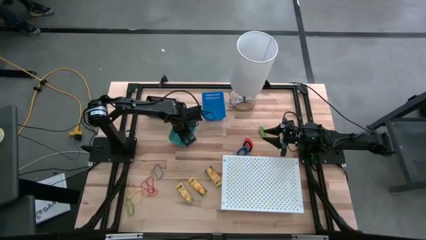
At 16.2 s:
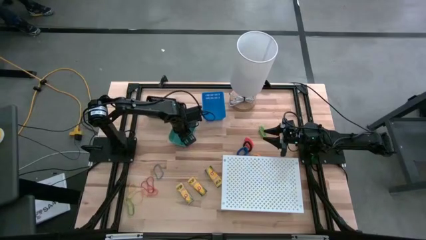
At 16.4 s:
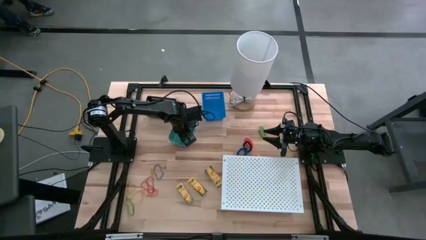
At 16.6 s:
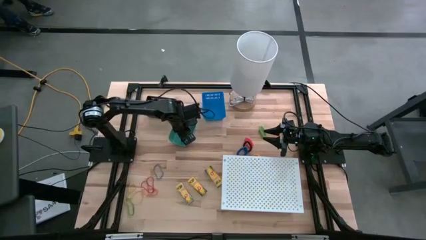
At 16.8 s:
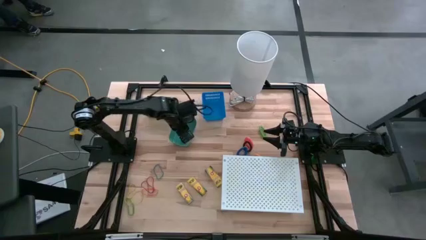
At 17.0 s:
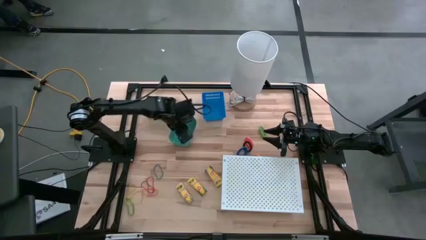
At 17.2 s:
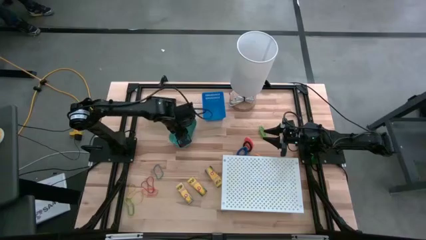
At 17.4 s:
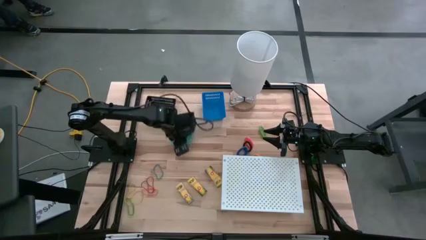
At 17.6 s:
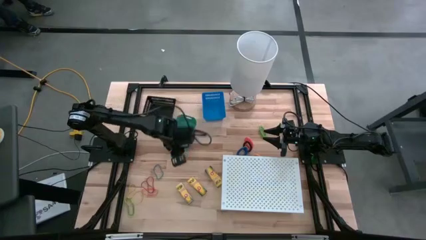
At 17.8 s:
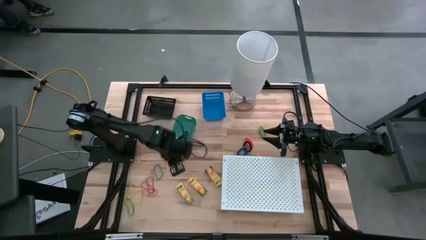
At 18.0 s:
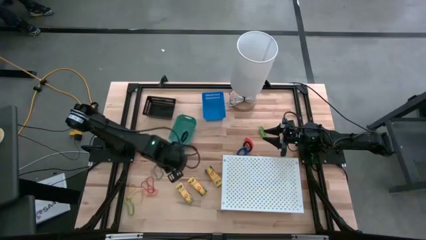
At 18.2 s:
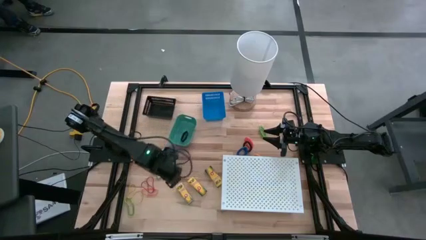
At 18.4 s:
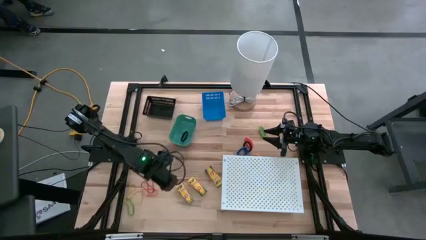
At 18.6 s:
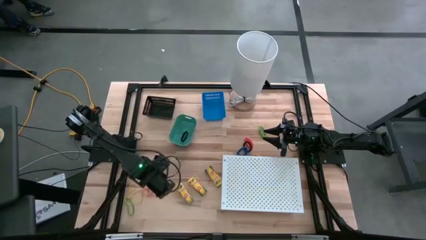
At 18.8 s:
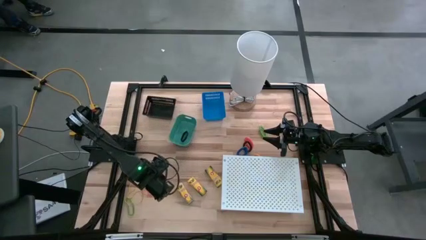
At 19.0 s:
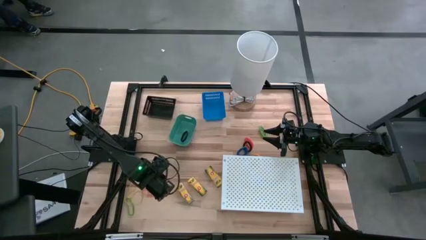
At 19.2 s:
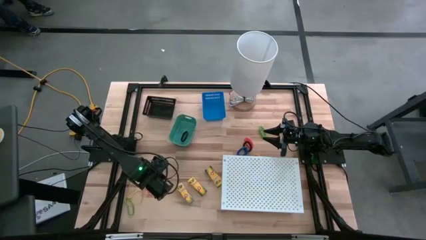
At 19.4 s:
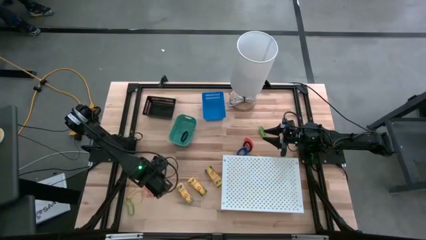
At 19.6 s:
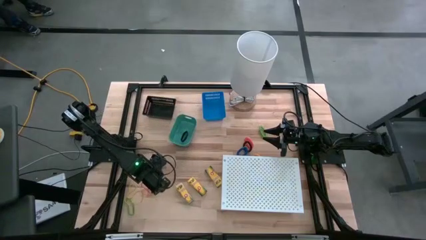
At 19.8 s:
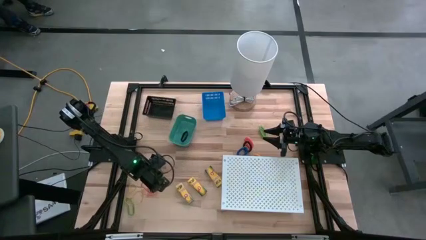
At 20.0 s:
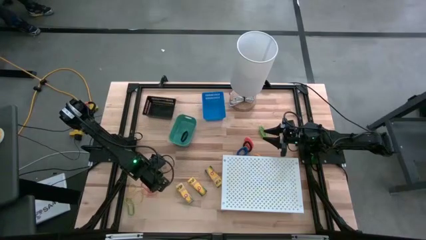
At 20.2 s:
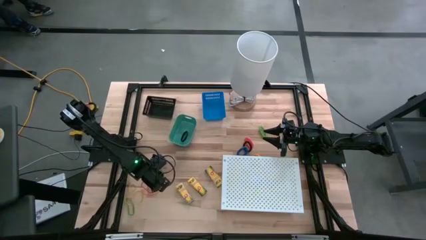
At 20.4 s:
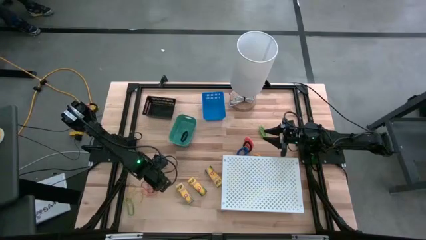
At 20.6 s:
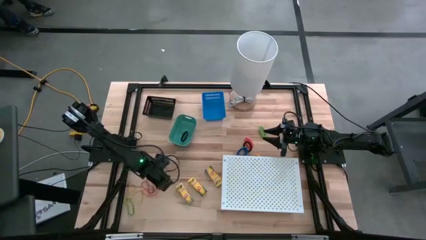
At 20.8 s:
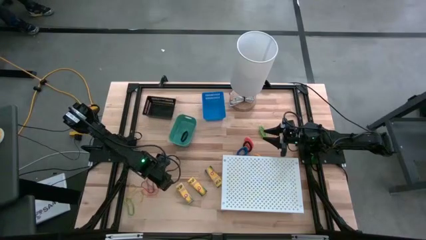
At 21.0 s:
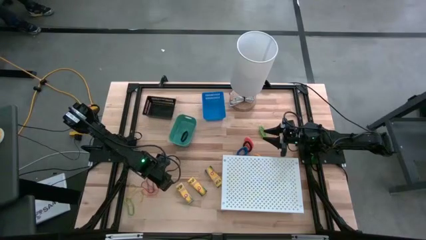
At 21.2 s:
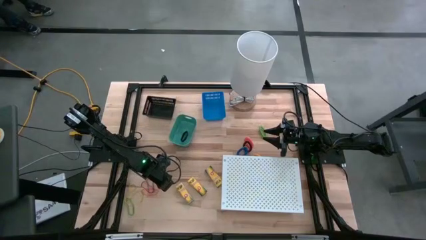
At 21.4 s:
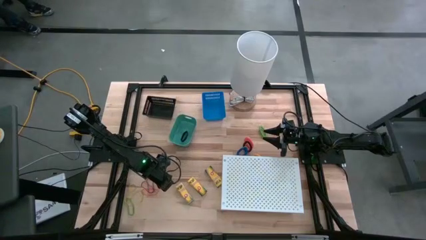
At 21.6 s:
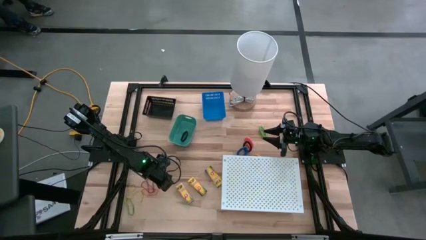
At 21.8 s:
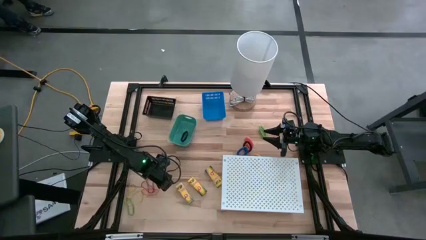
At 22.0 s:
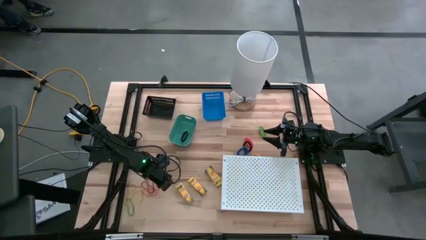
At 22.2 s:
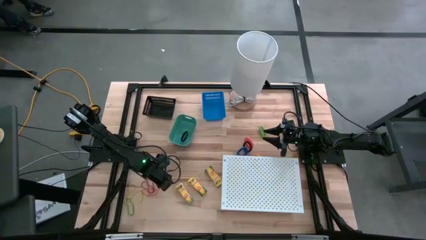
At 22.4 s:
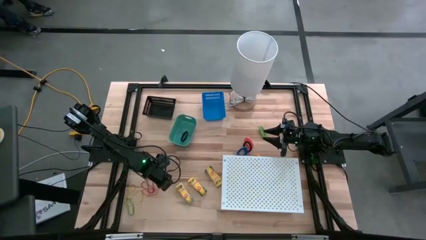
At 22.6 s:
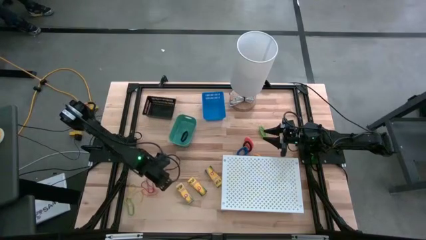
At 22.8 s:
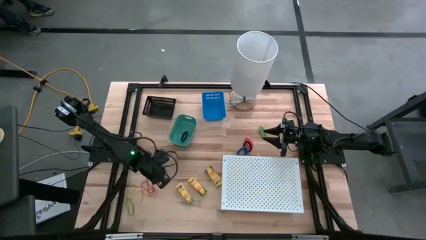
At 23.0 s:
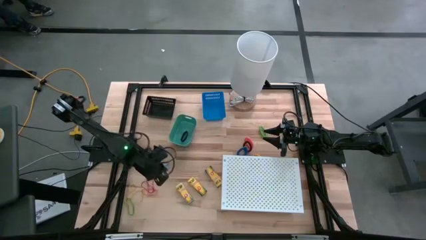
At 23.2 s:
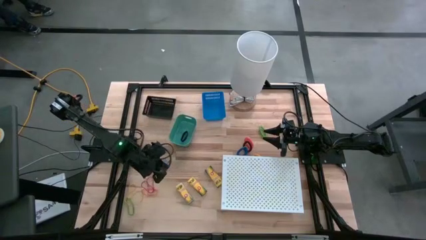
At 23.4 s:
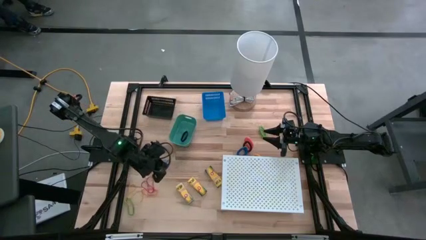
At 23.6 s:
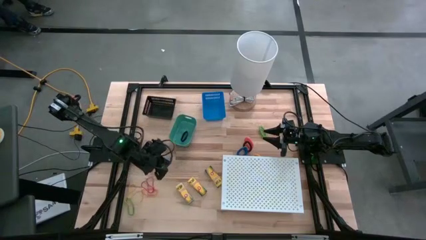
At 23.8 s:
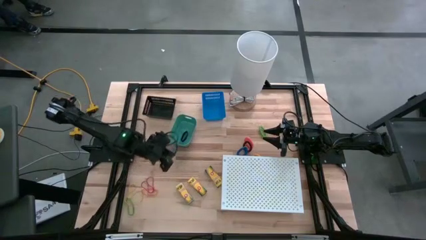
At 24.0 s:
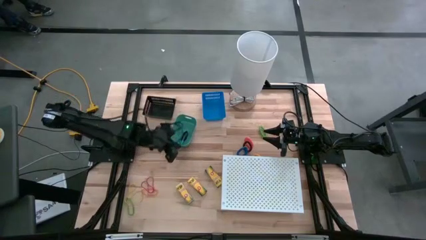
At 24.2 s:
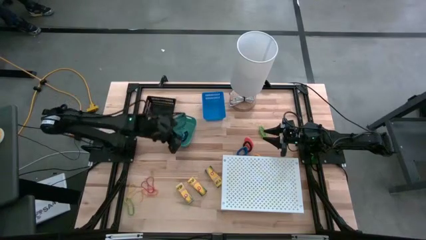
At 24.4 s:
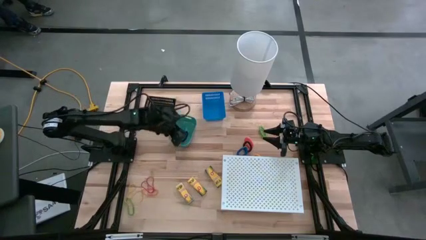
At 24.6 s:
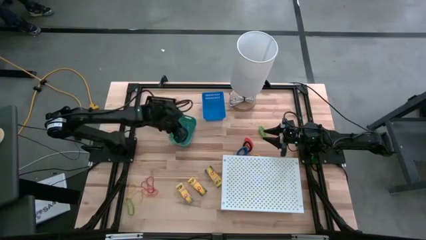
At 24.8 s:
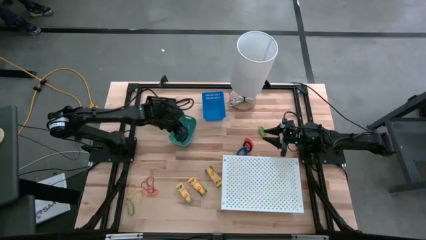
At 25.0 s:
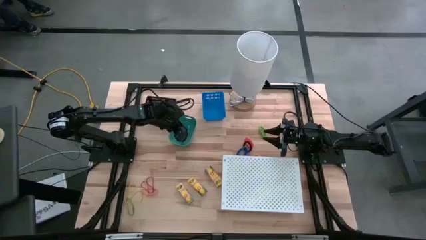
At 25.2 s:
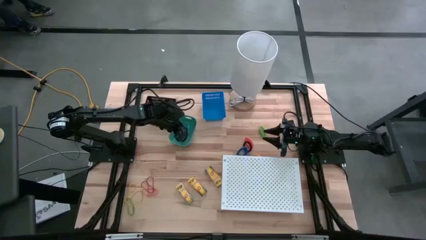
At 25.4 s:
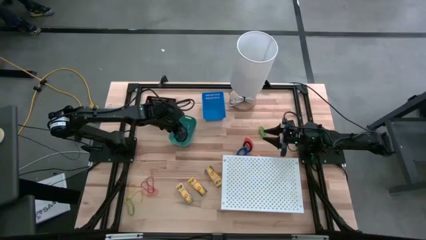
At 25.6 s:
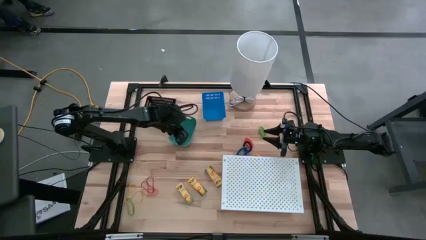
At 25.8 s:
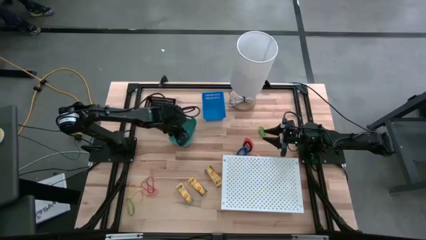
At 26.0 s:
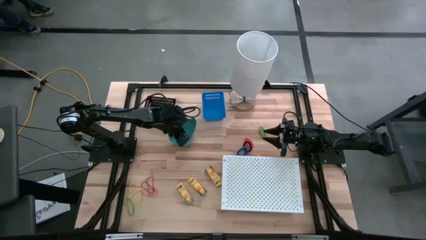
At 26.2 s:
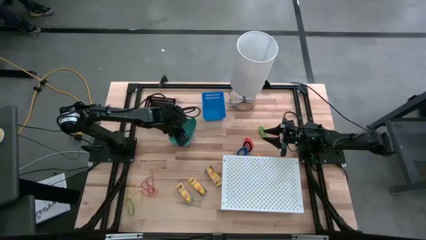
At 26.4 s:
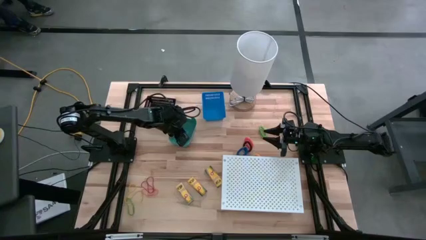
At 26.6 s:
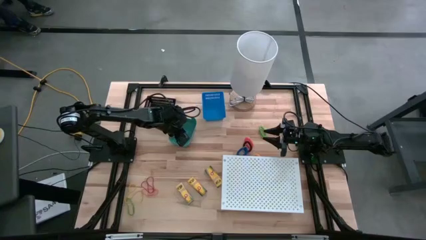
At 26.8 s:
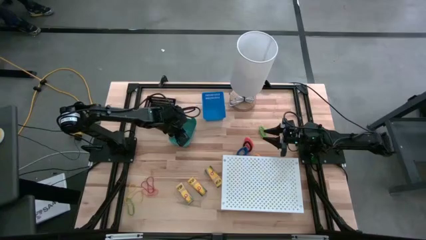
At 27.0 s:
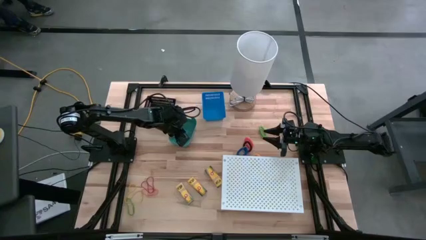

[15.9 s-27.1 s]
Task: Pick & Place Office Desk Supplies
Put the blue rubber band into the green bin
